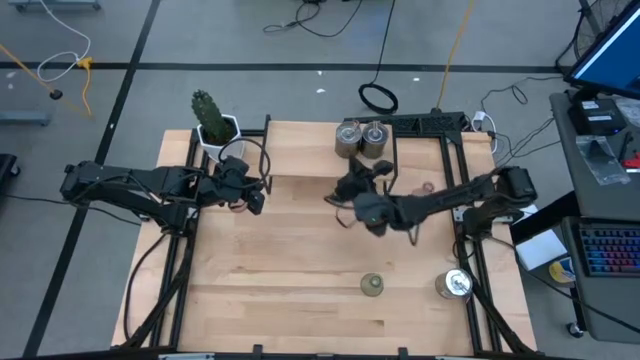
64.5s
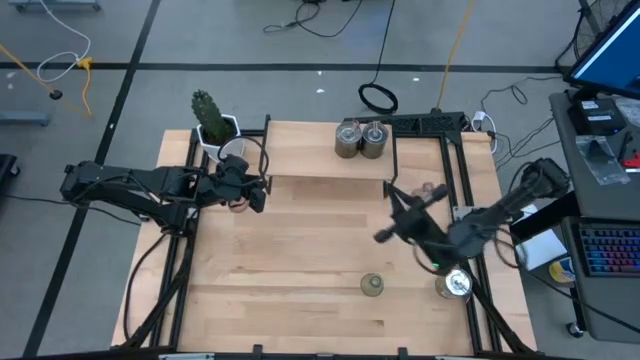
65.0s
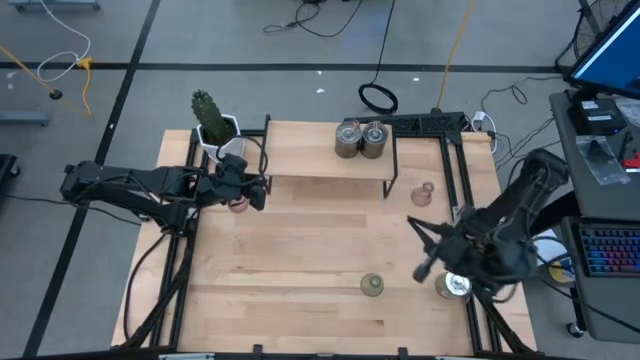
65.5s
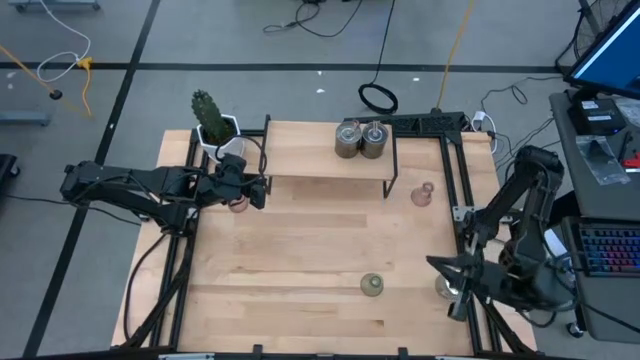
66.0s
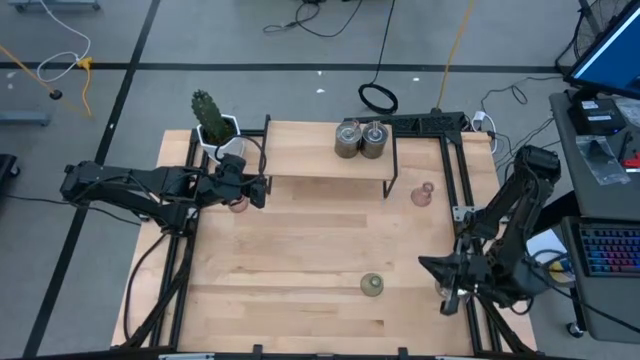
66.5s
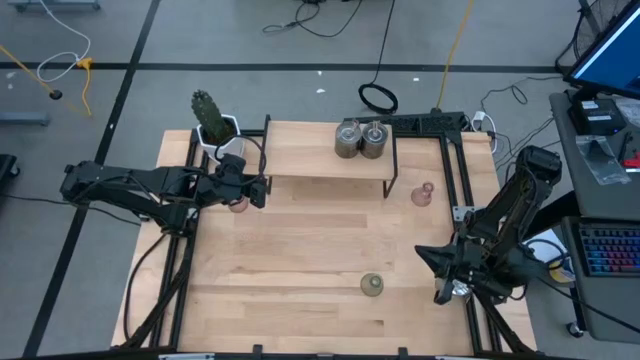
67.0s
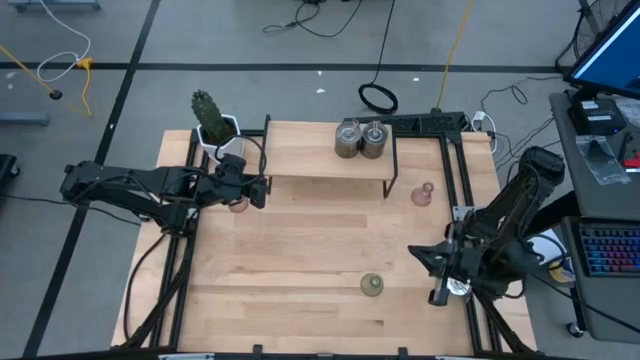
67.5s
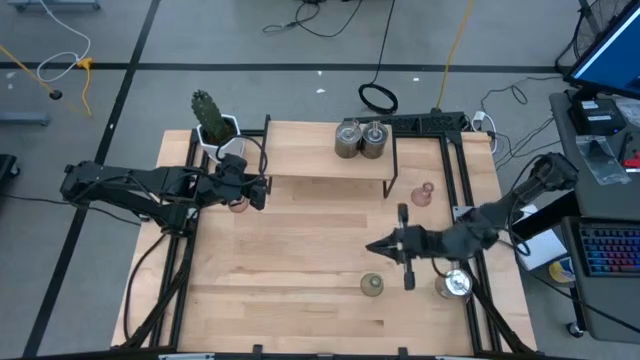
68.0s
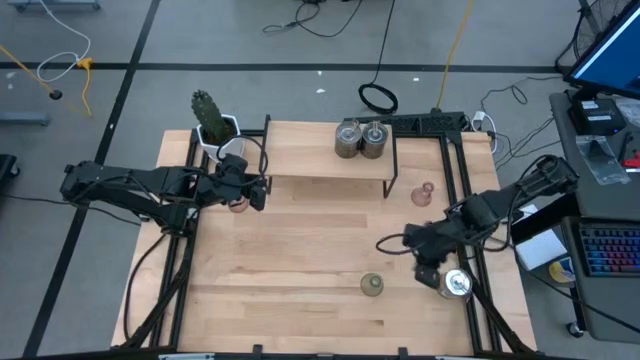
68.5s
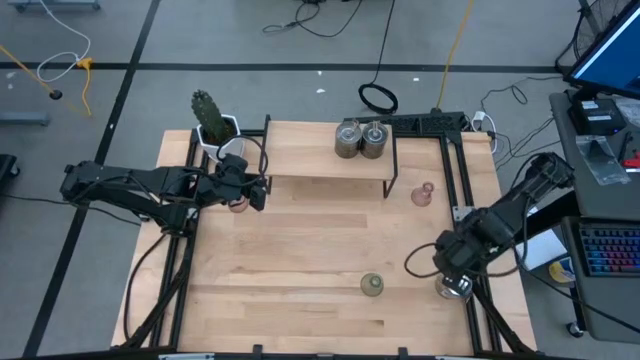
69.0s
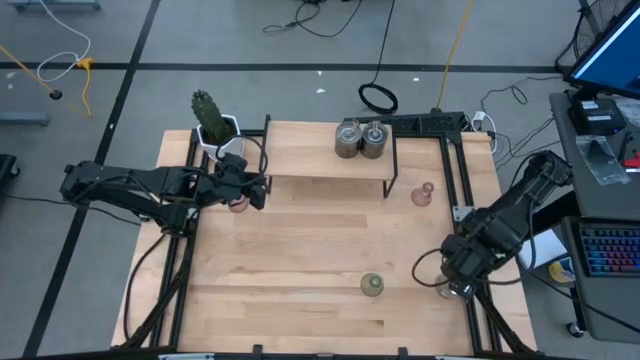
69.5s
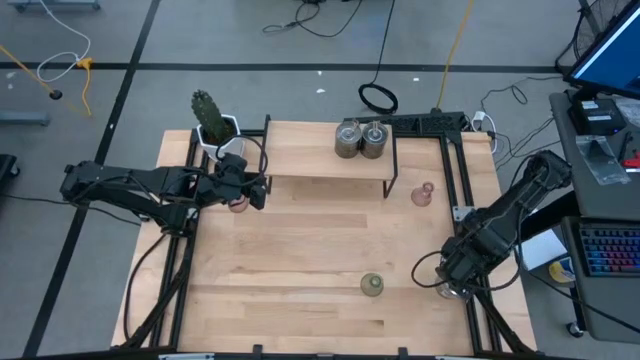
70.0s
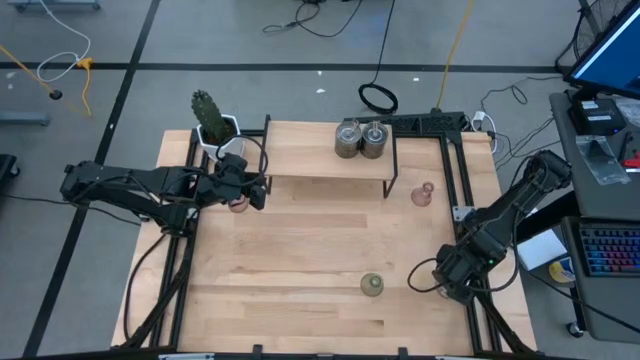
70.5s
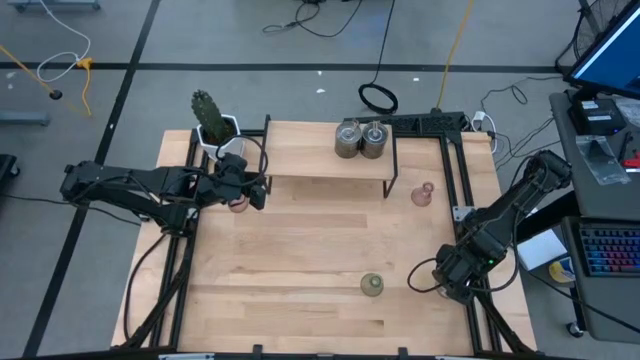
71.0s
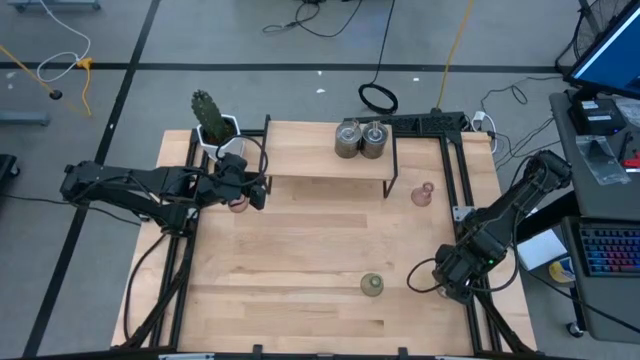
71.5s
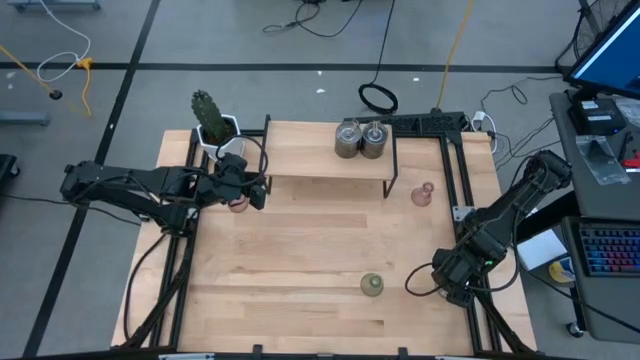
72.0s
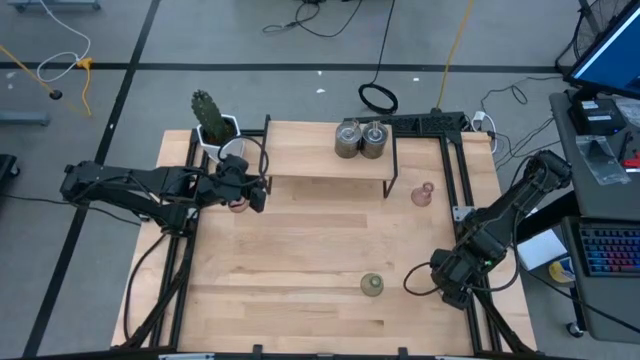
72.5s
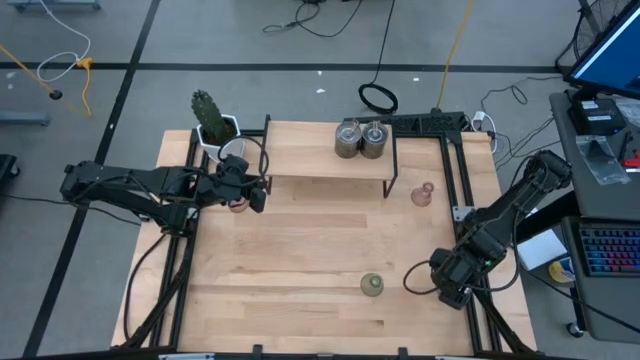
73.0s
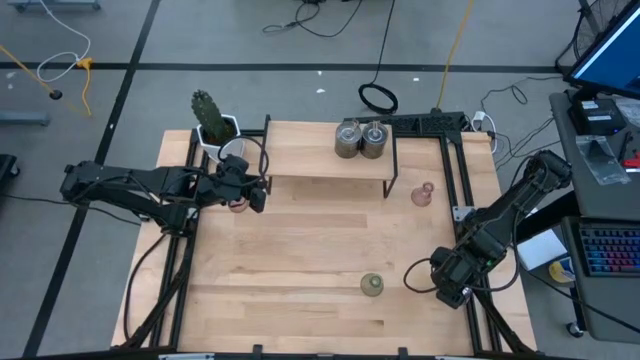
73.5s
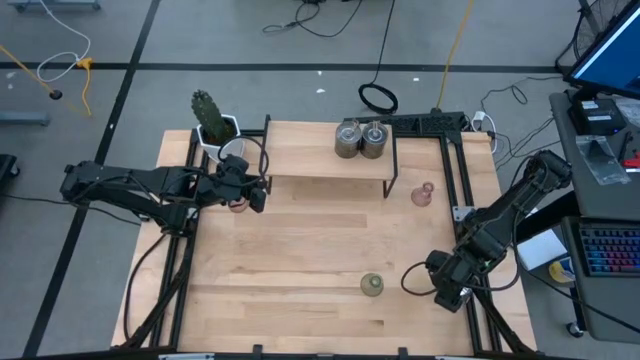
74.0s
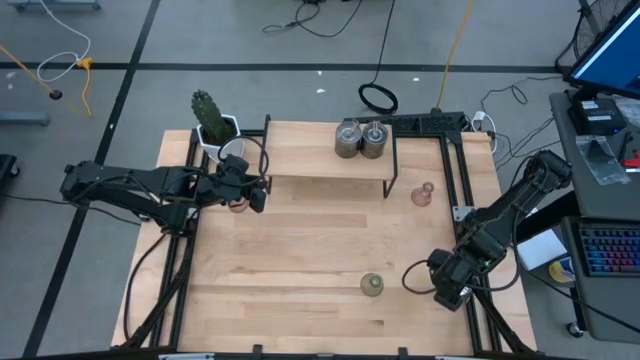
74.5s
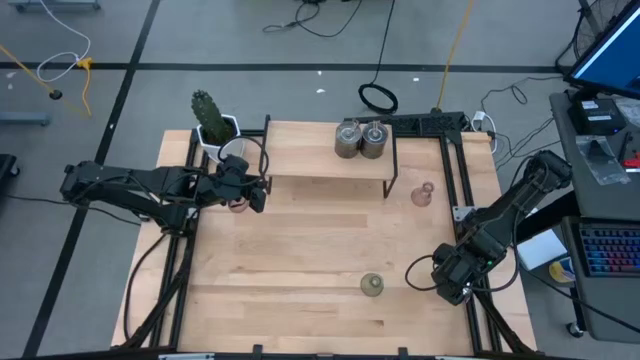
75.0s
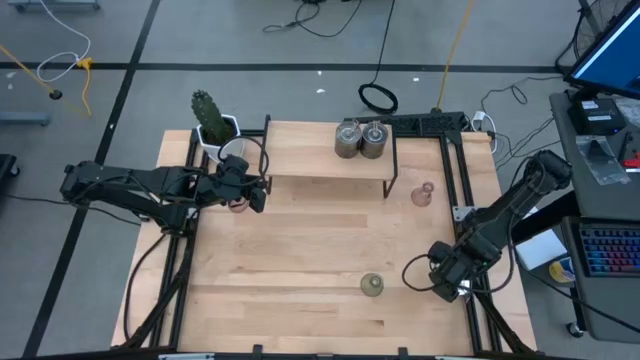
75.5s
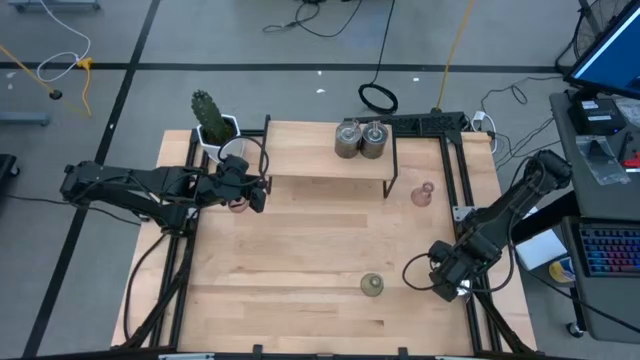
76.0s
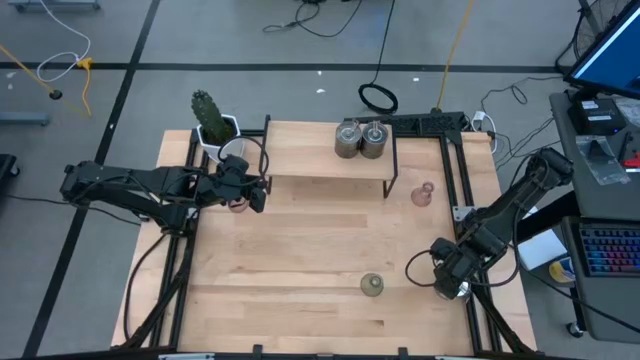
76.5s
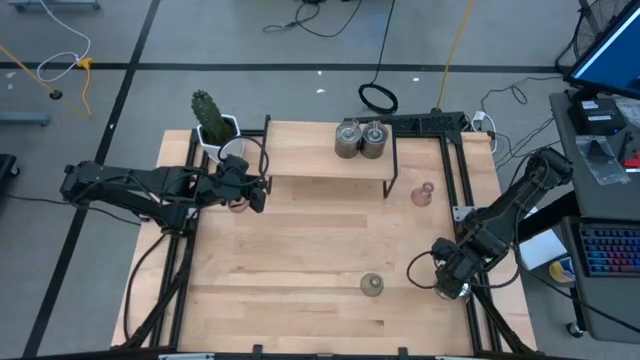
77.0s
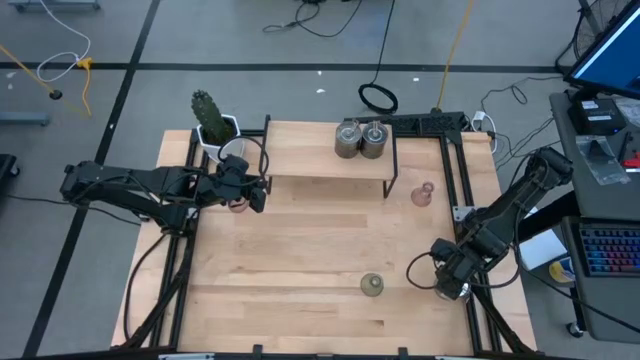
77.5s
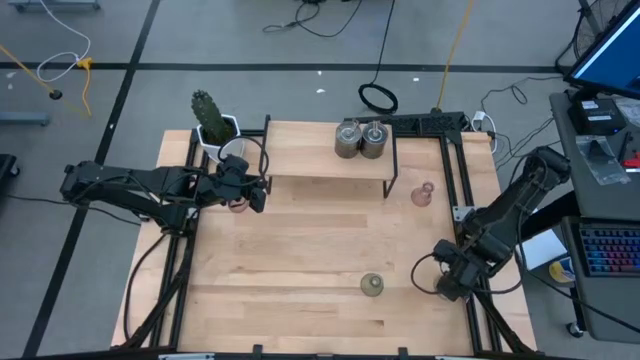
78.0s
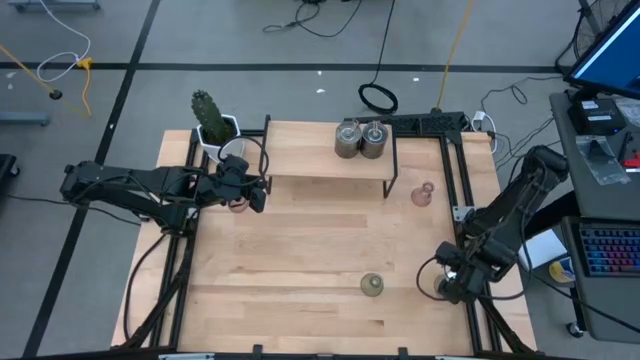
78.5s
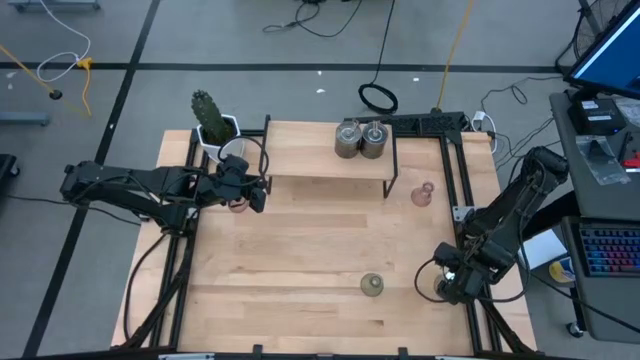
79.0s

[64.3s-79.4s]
Task: Pick & Place candle stick holders
Put the brown scented candle on the shelf

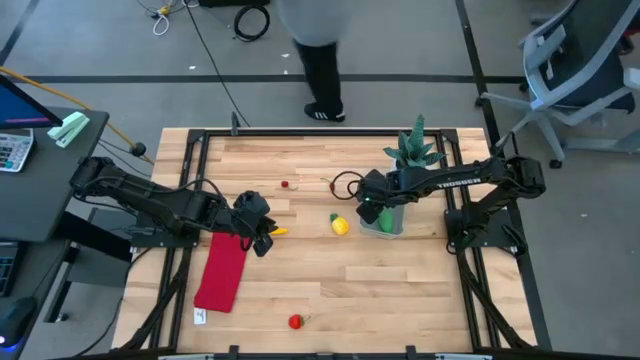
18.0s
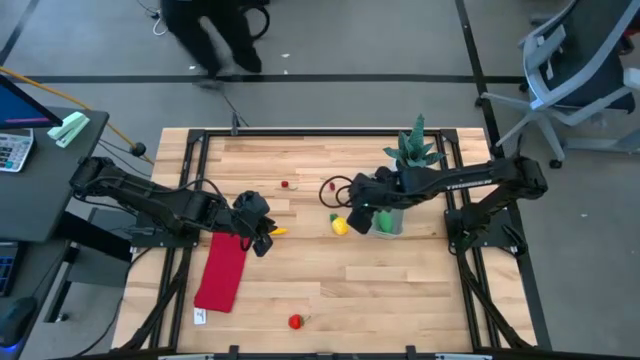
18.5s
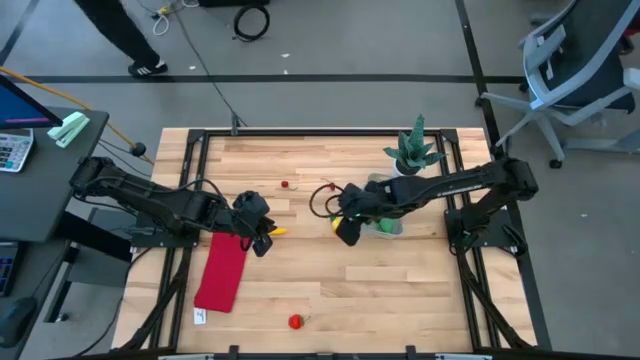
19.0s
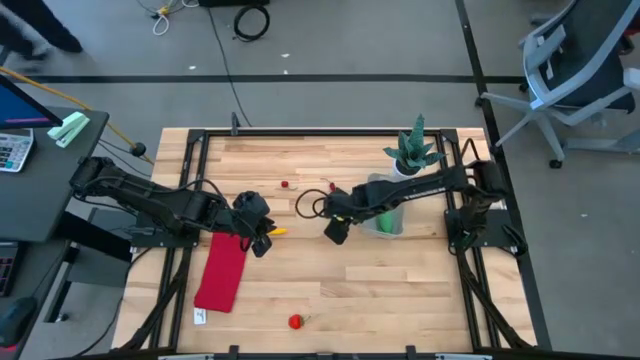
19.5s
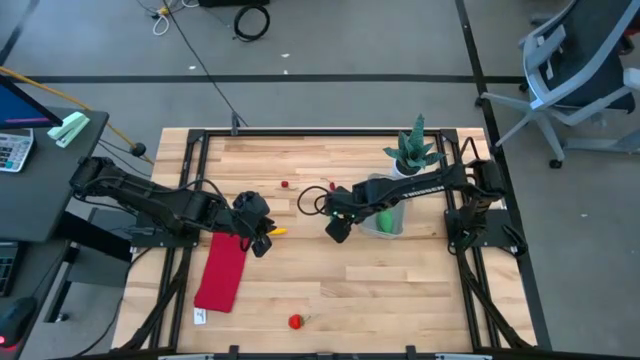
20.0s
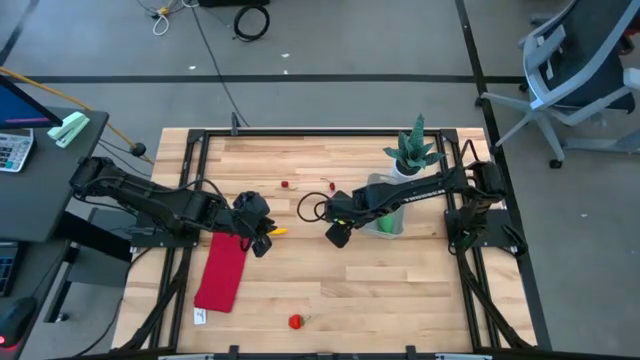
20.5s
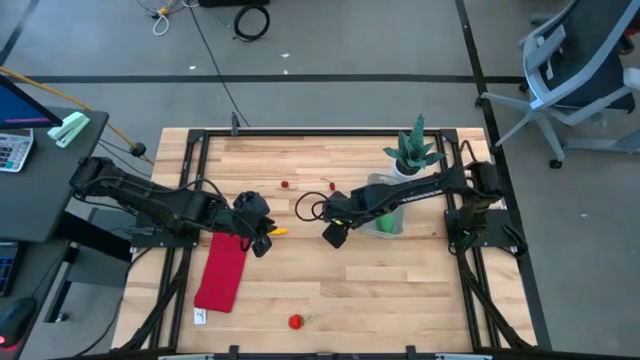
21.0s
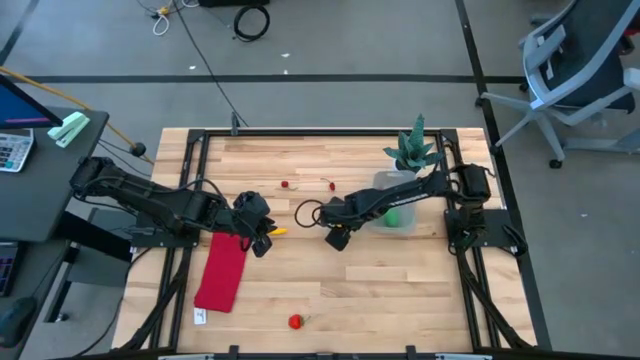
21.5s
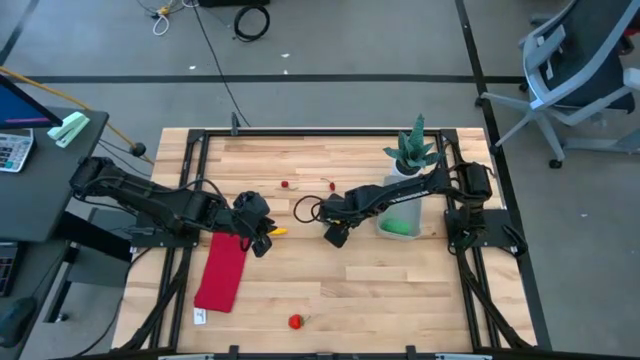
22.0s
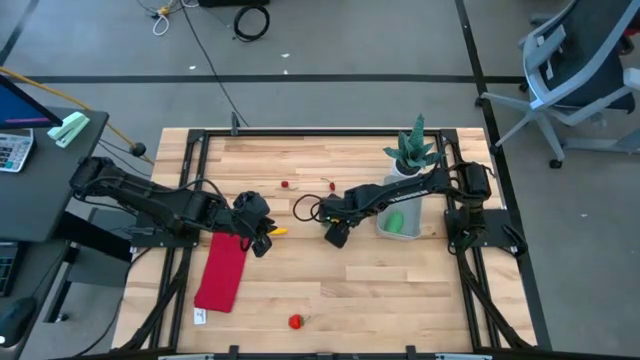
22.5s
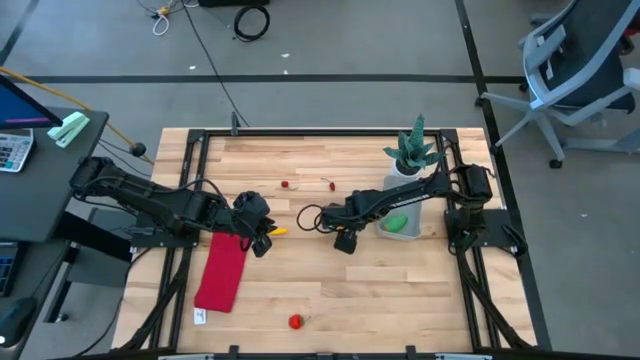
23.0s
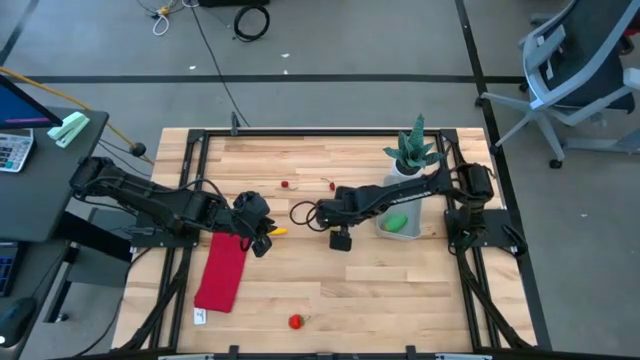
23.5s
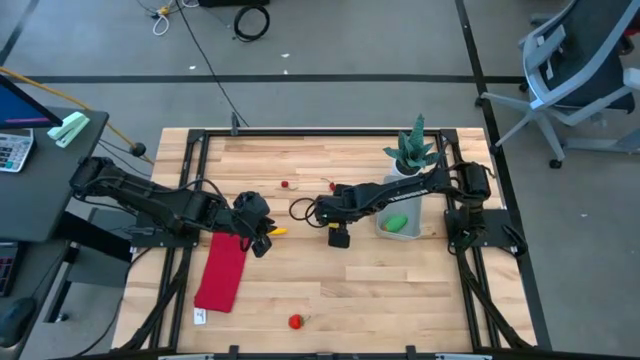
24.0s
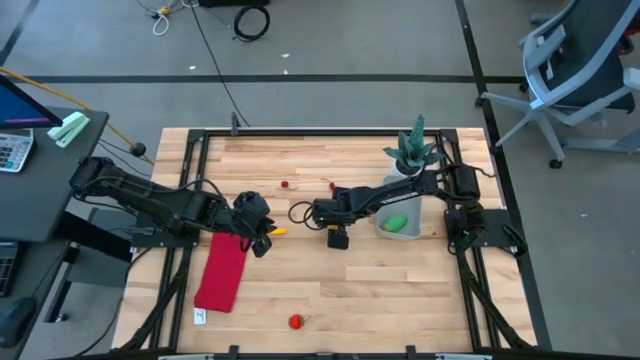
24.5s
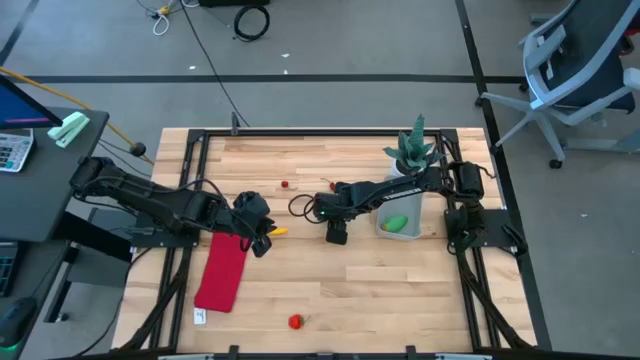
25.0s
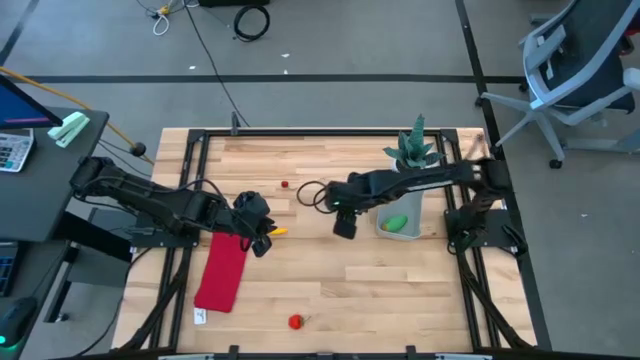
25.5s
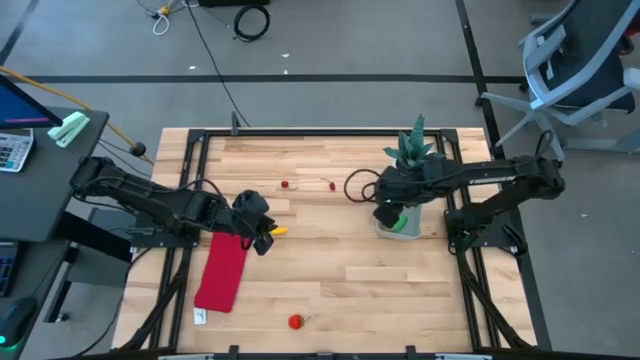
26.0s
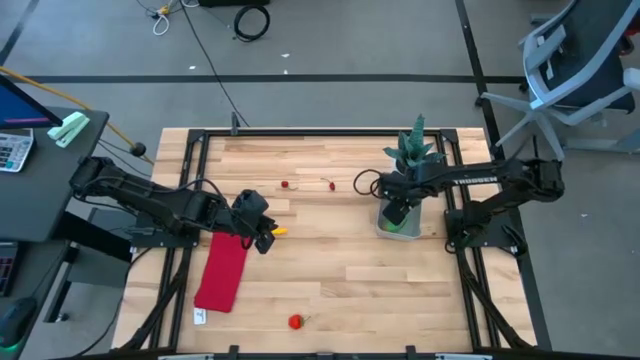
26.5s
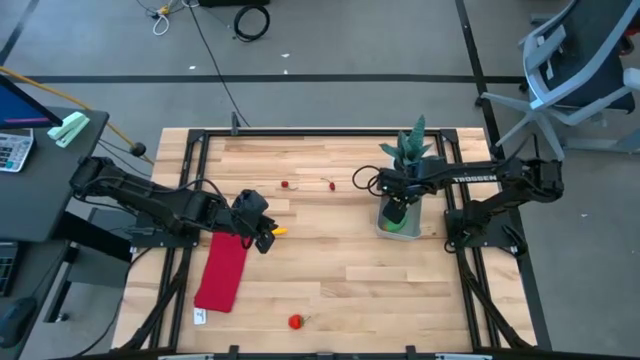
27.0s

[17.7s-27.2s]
Task: Pick and placing Produce into tupperware
Put the pineapple into the bin
